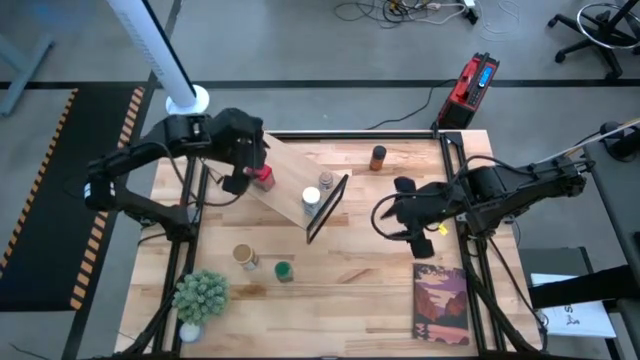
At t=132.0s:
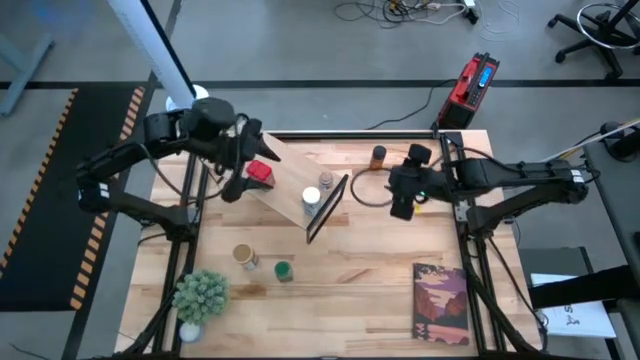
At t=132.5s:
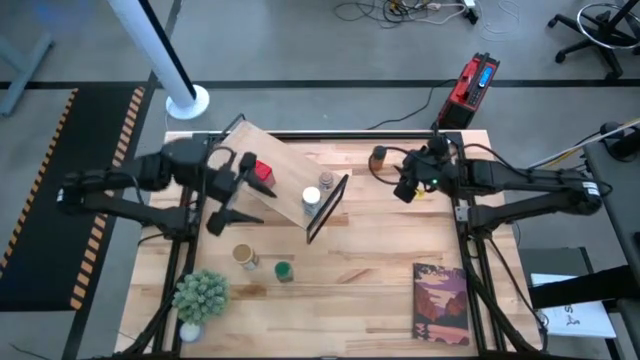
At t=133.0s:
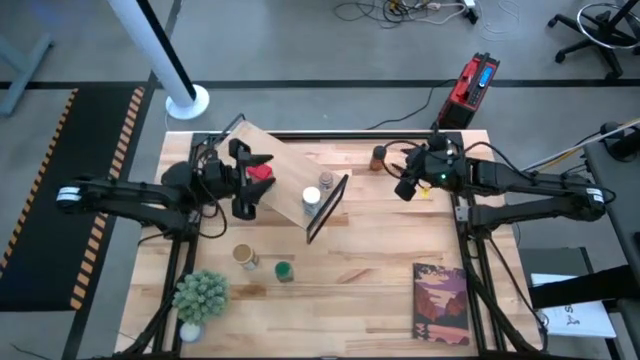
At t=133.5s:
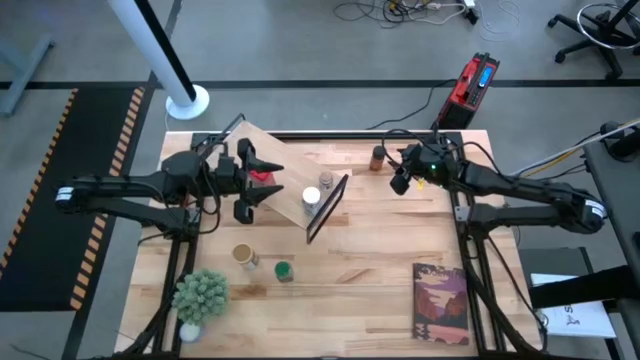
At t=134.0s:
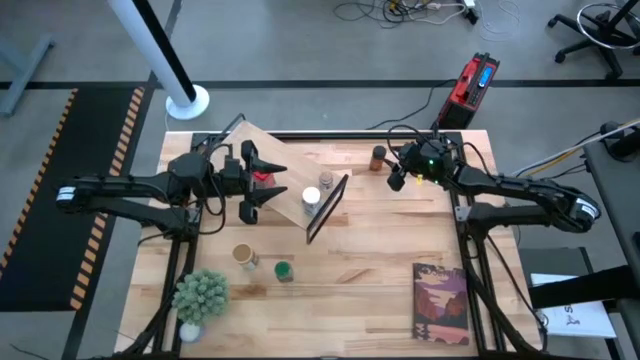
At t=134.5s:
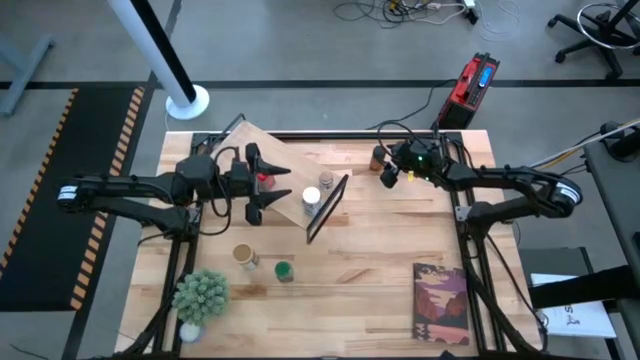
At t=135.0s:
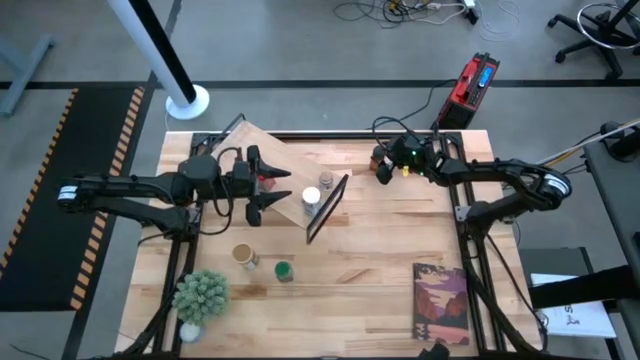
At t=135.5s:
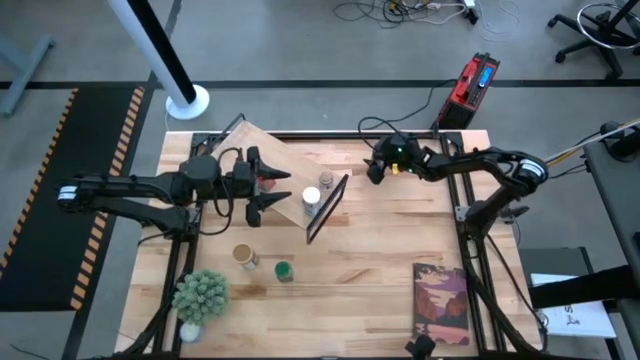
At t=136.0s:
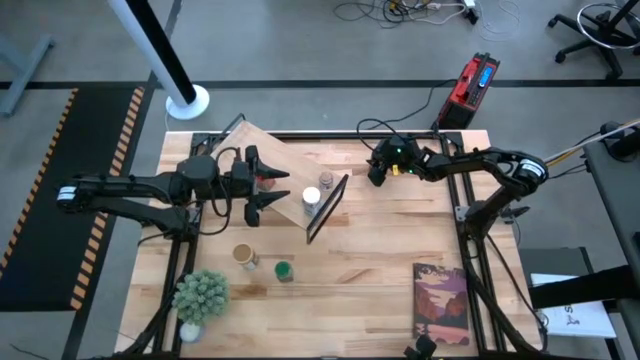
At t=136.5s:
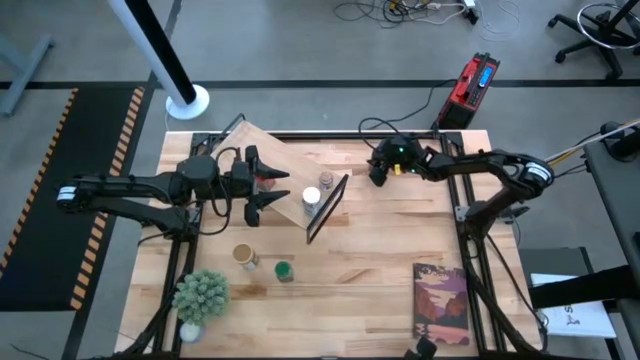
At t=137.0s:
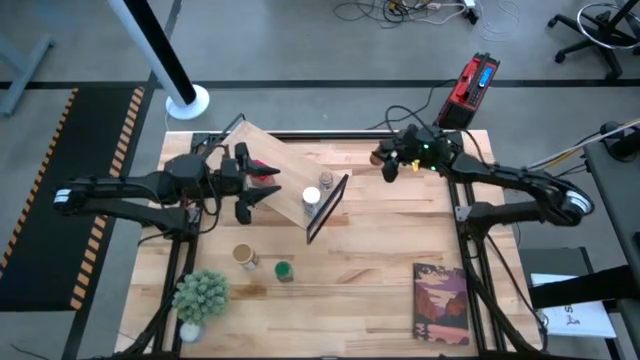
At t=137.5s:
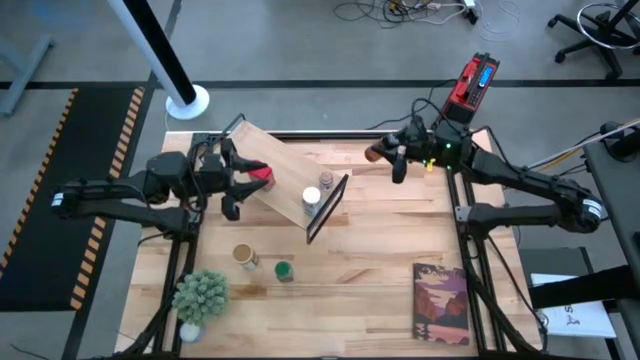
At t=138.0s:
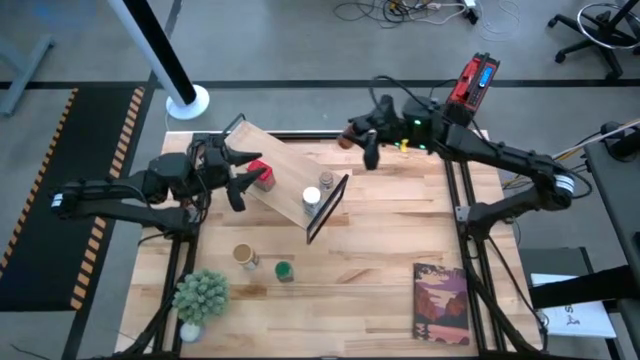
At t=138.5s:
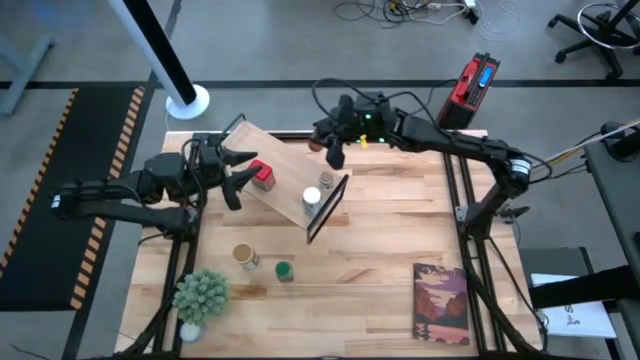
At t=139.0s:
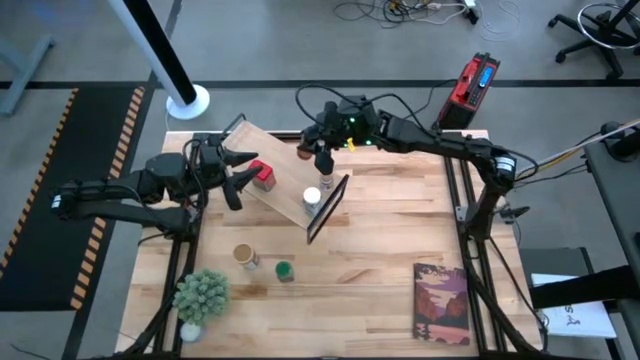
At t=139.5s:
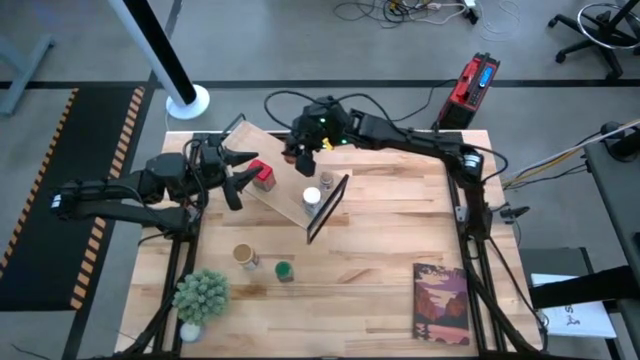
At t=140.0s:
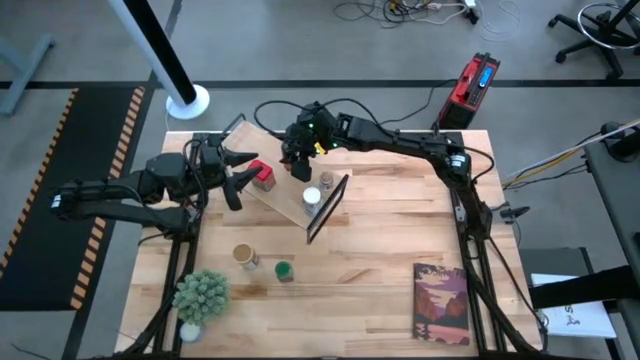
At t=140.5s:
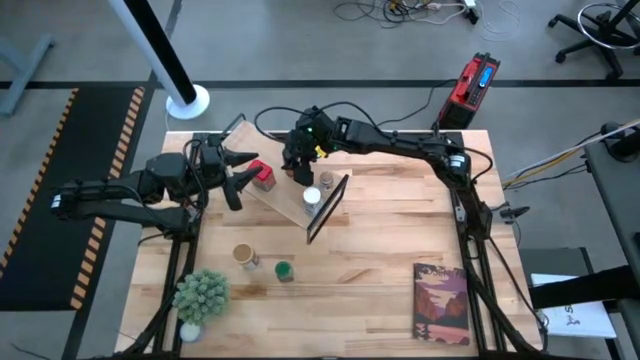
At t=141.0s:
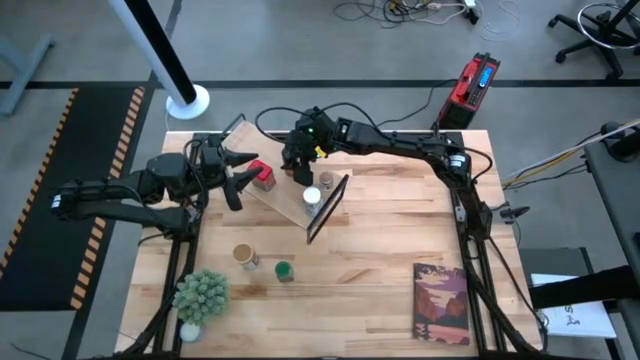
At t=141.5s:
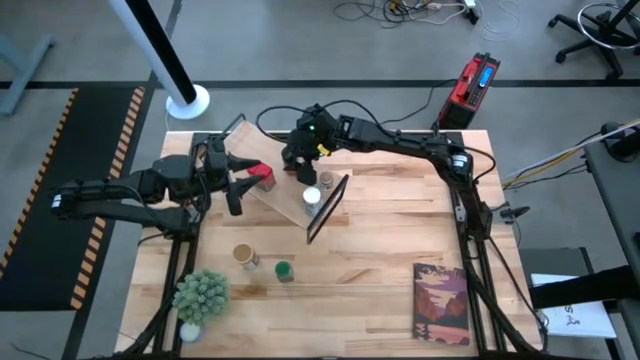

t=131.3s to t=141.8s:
Task: Shelf spices
Put the black seasoning bottle on the shelf

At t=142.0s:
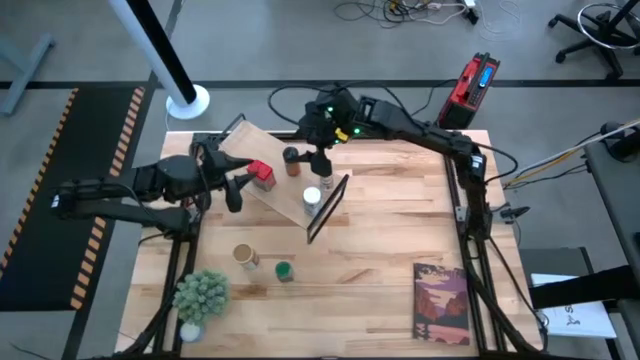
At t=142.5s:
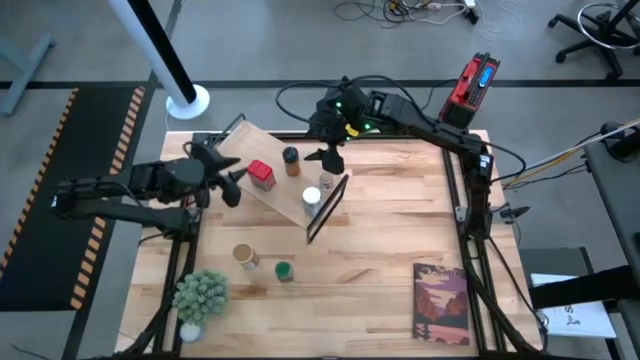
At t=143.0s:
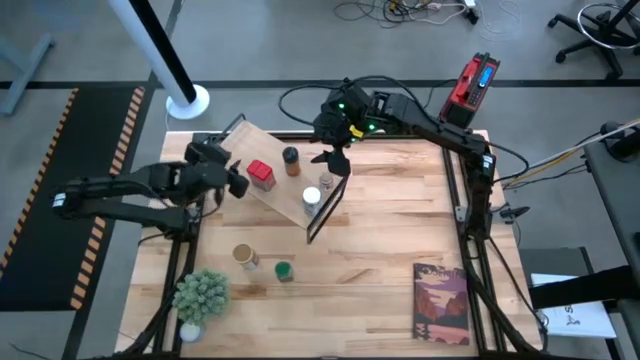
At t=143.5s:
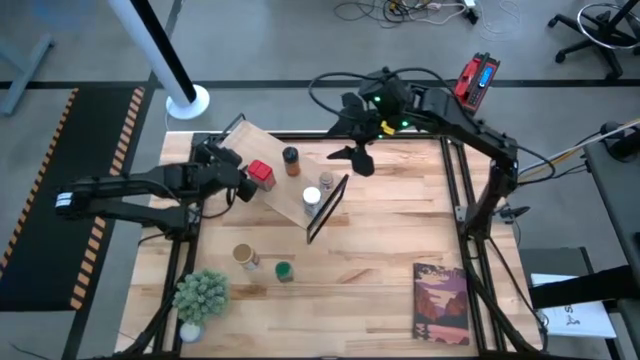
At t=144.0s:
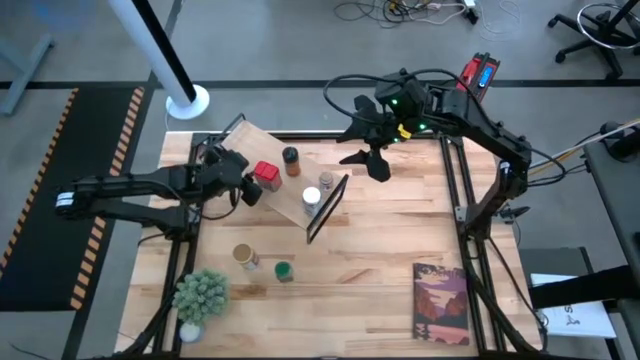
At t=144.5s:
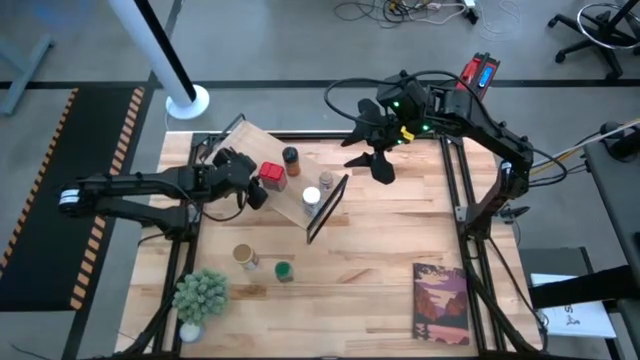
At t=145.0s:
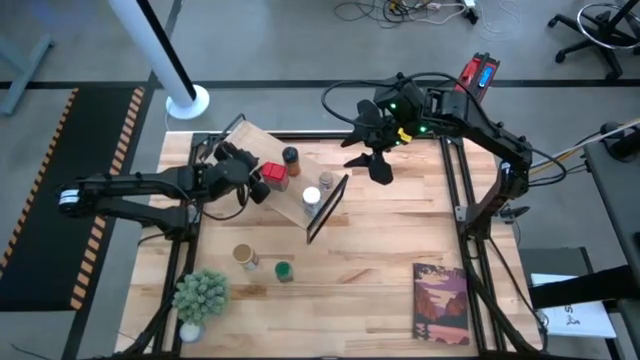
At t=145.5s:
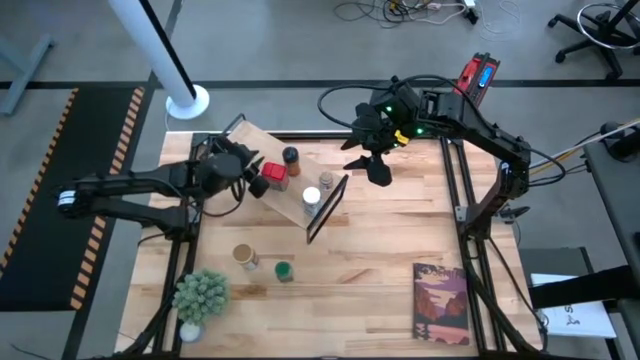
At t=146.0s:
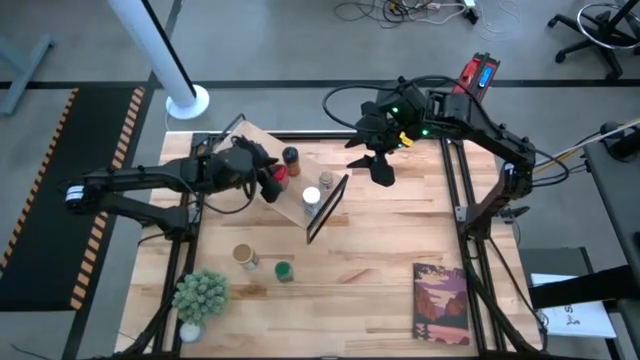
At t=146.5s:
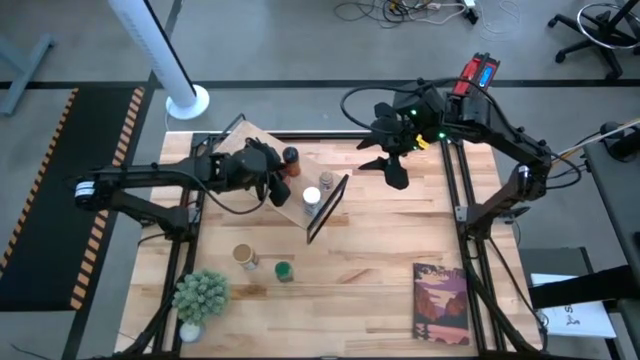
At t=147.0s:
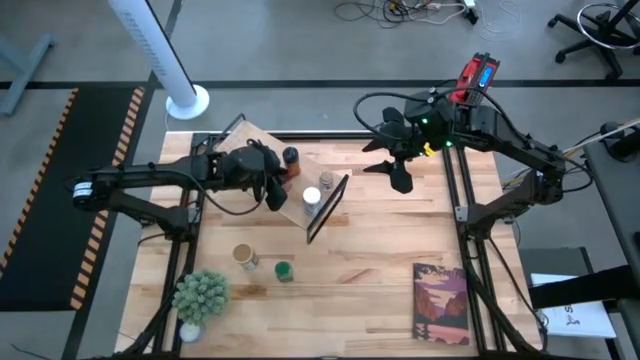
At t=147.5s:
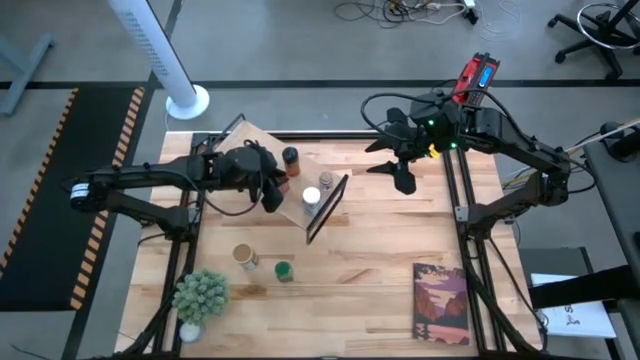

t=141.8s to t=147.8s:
Adjust the red seasoning can

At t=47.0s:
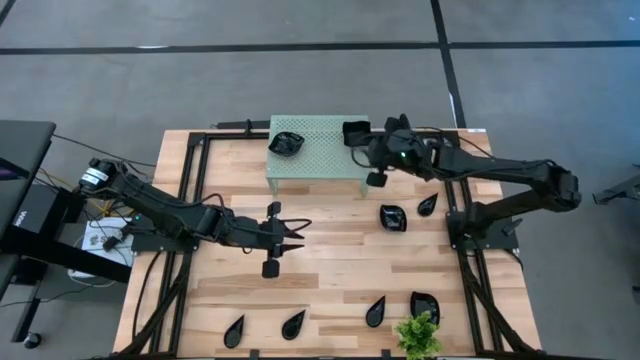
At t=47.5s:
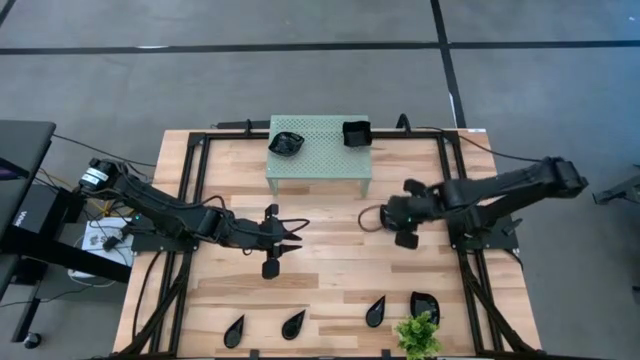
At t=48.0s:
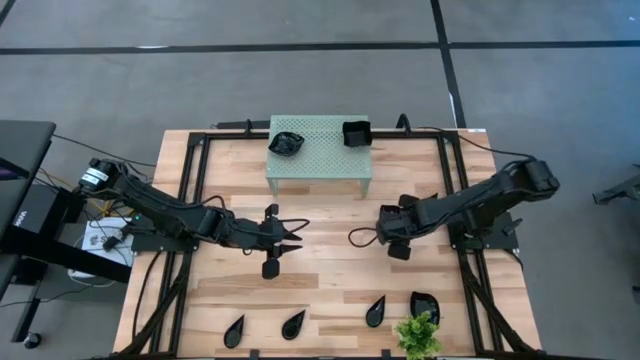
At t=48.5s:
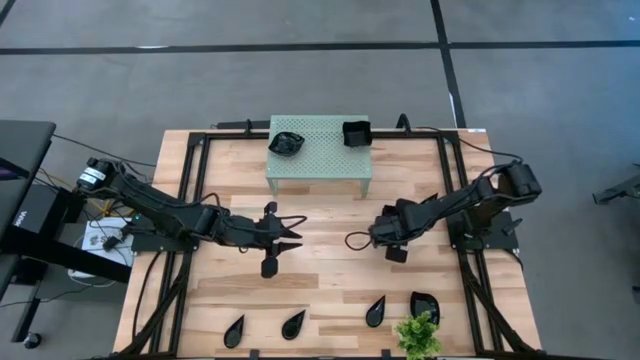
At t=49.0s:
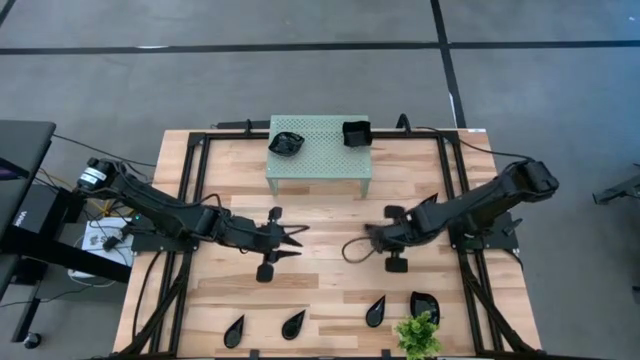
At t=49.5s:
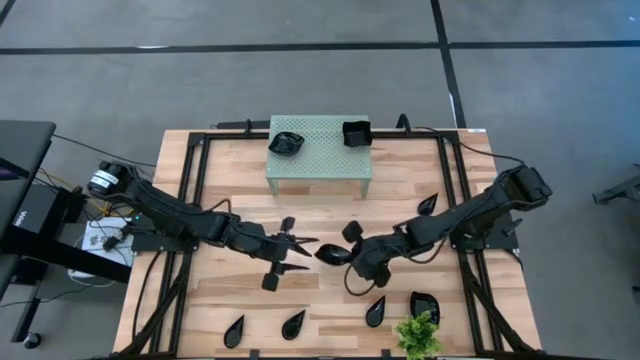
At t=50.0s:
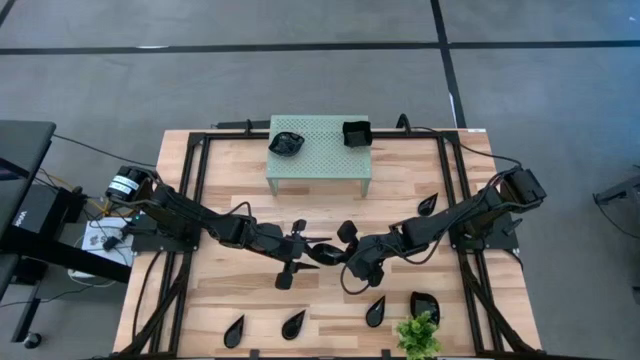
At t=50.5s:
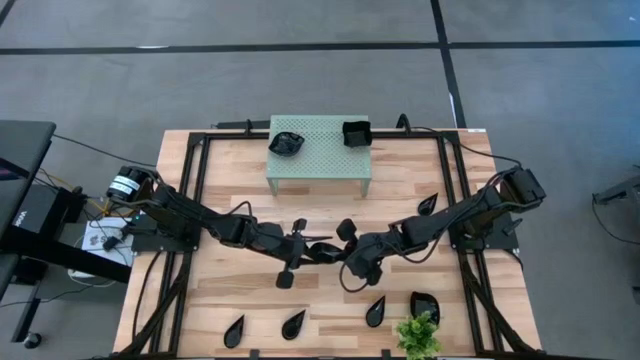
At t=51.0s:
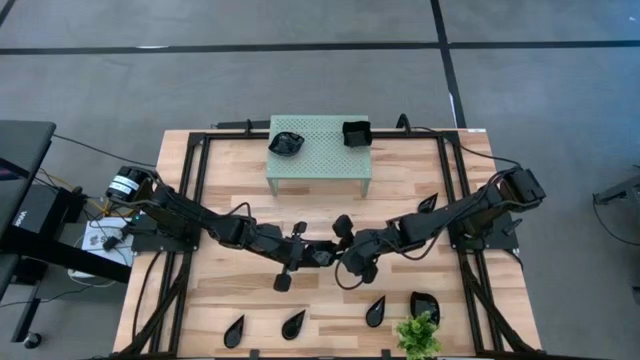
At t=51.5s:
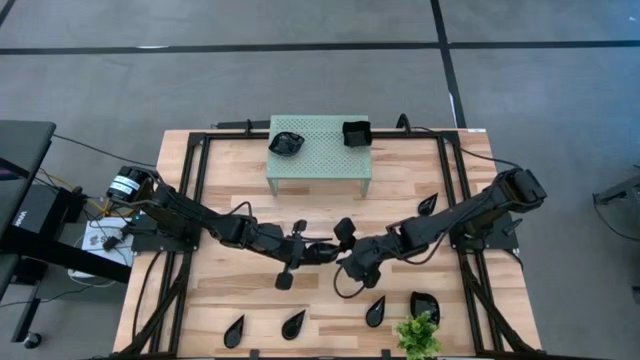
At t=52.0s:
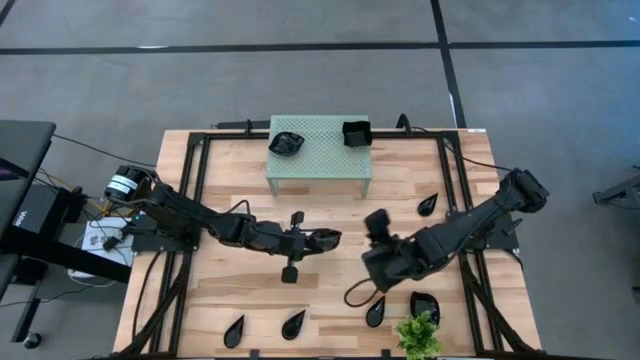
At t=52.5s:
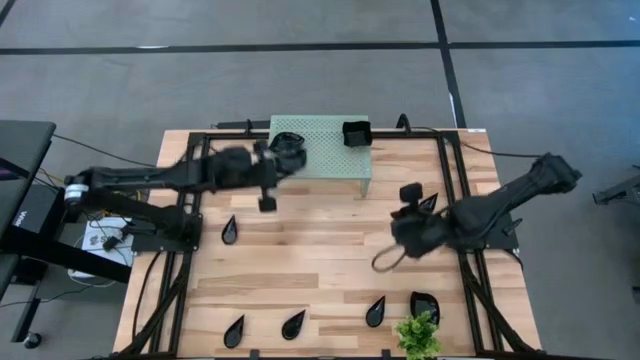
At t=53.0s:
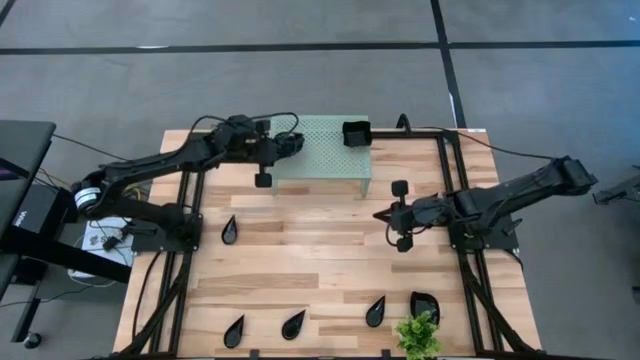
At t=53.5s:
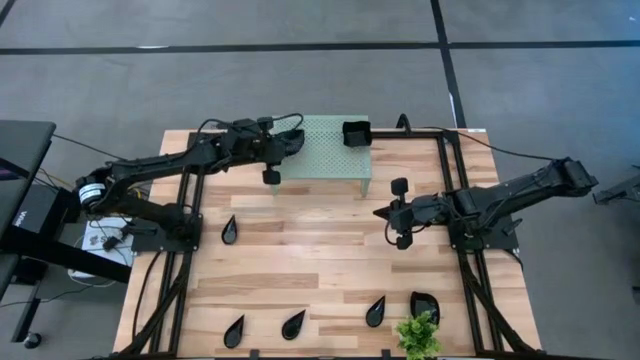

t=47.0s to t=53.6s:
Task: Pick & Place Mini shaped plates
Stack the leaf-shaped plate on top of the other leaf-shaped plates on the shelf
